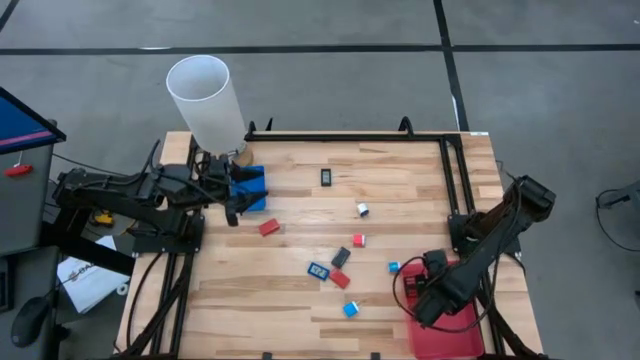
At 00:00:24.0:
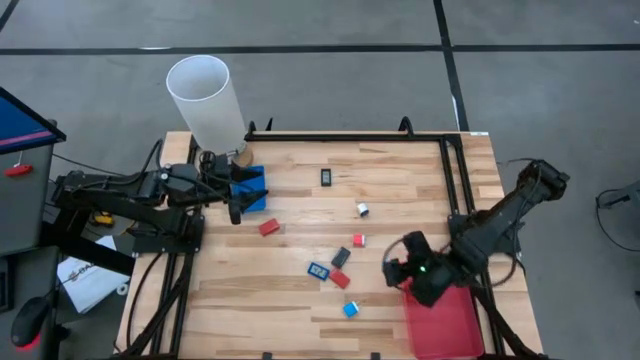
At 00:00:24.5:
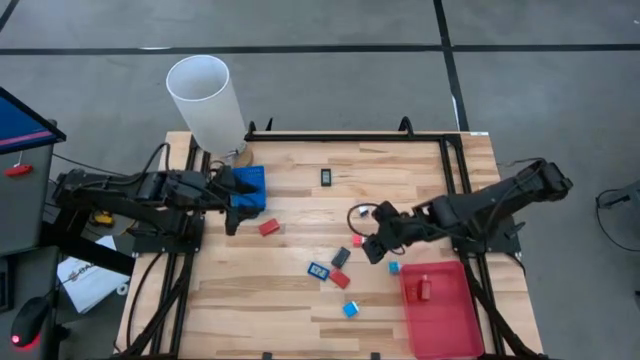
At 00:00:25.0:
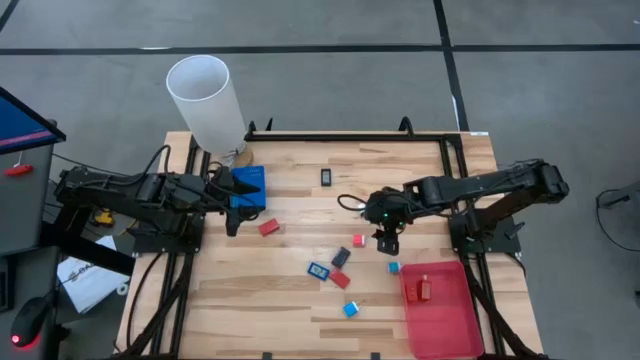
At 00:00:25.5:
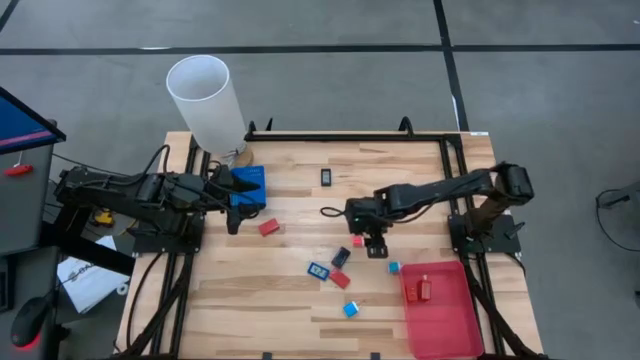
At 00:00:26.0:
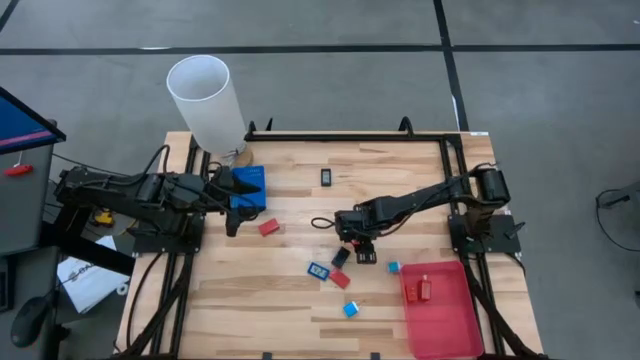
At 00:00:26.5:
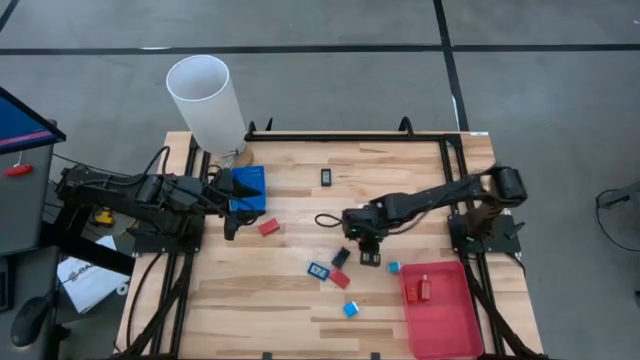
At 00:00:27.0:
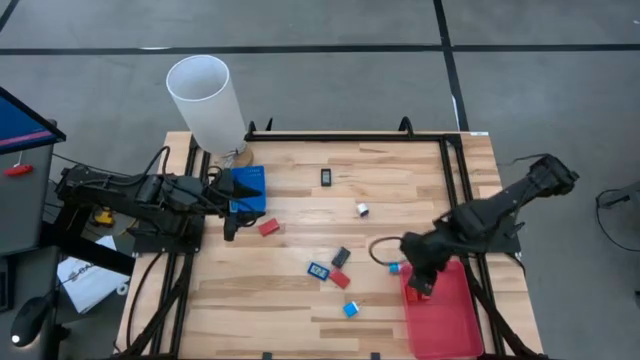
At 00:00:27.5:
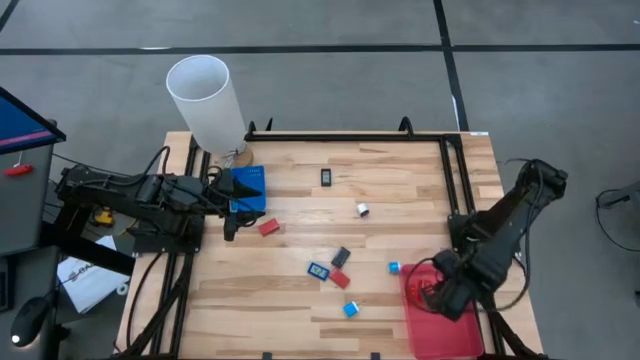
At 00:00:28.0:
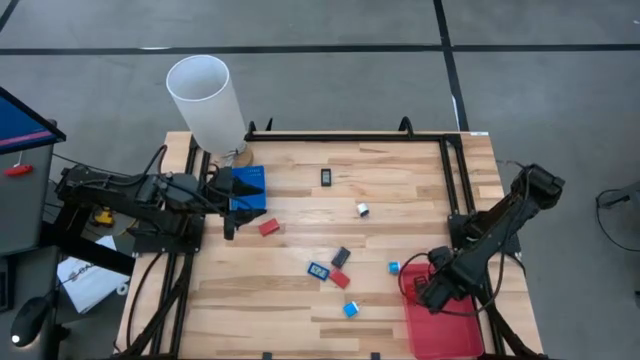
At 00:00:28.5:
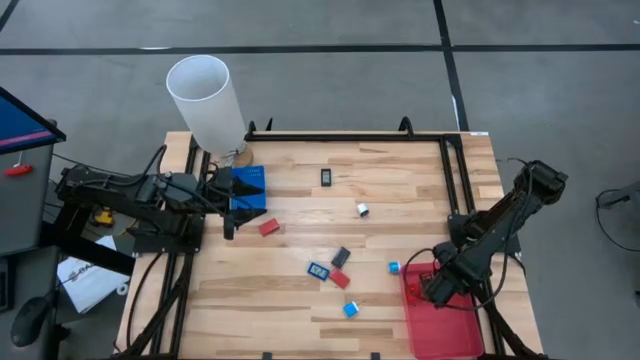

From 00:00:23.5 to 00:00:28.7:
Task: Pick & Place Office items
Put the pink charger adapter into the red bin

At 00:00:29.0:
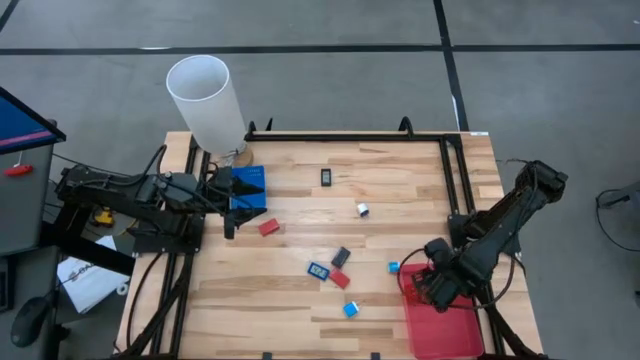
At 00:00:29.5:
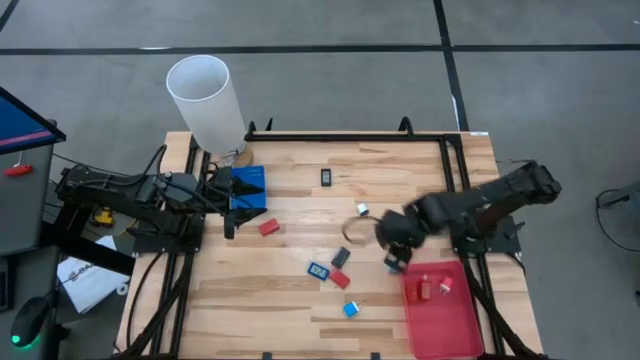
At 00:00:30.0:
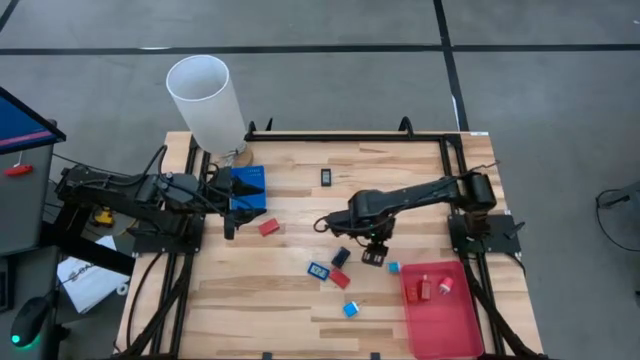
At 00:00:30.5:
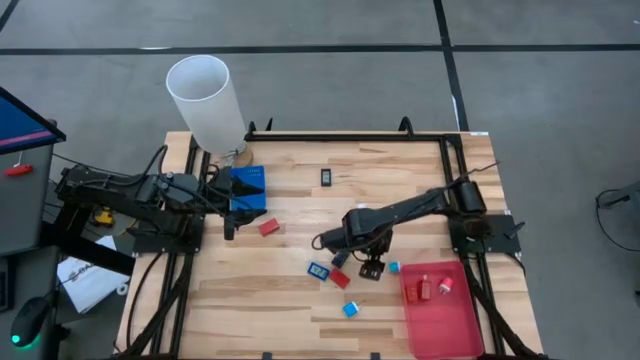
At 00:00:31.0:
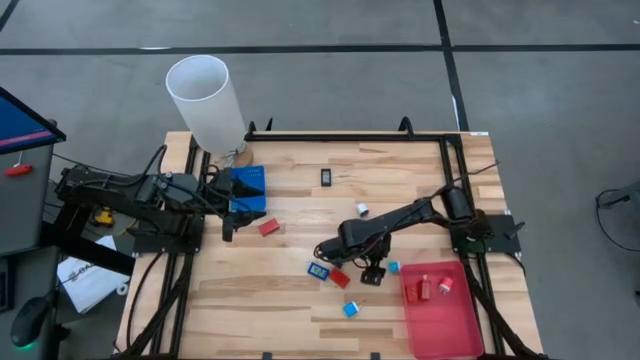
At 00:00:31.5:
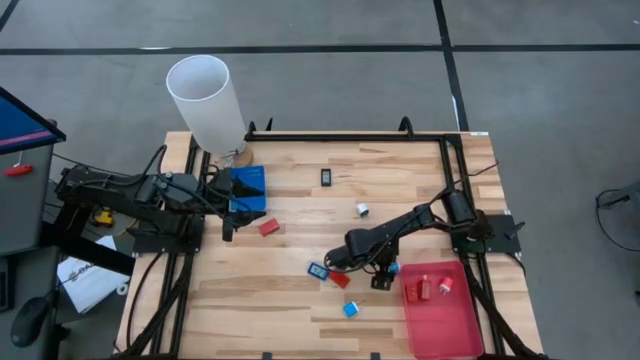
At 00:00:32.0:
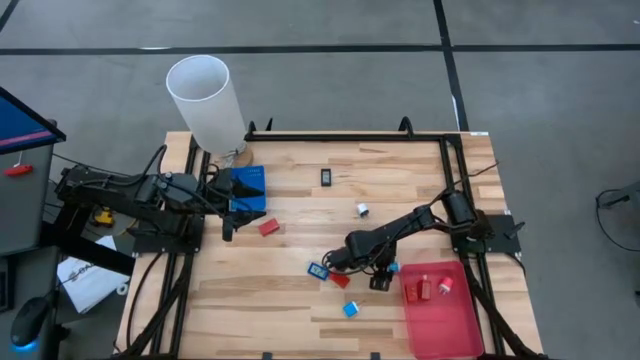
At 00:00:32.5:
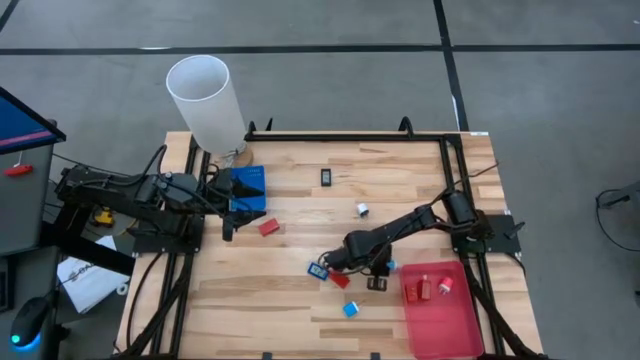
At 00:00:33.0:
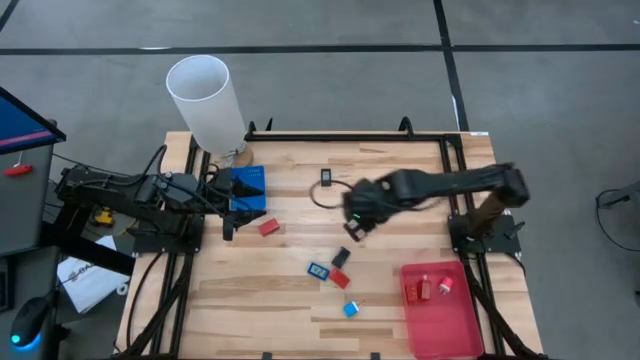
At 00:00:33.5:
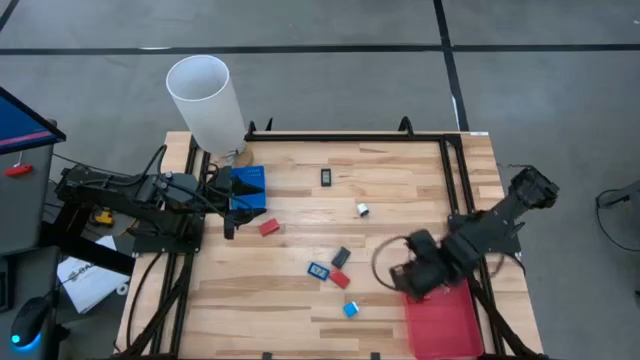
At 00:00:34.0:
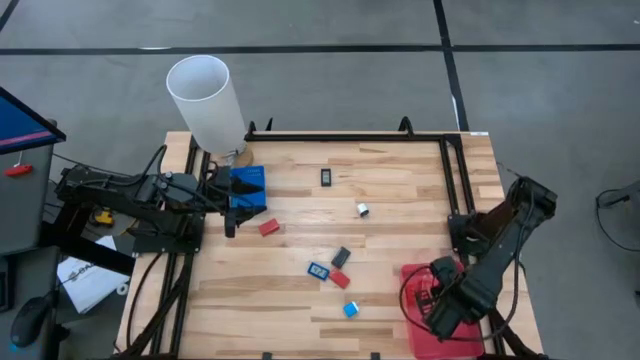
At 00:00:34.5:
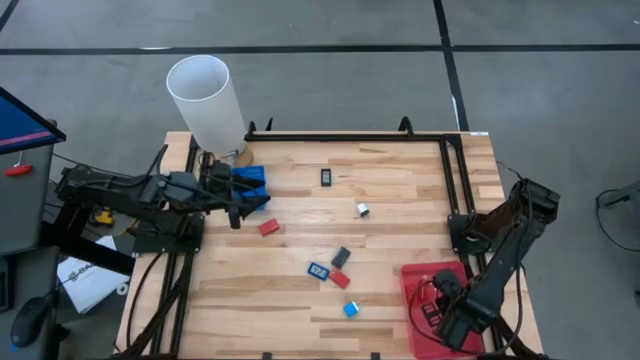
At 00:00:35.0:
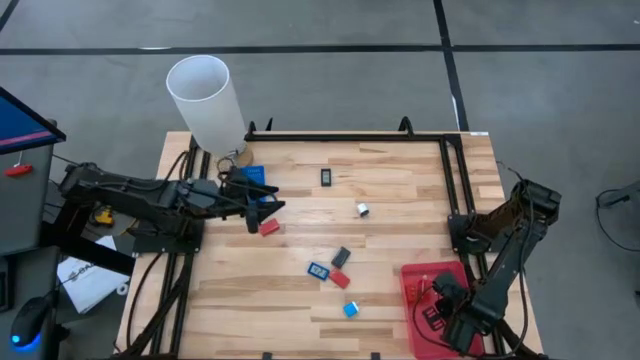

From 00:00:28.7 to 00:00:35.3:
Put the top blue charger adapter into the red bin

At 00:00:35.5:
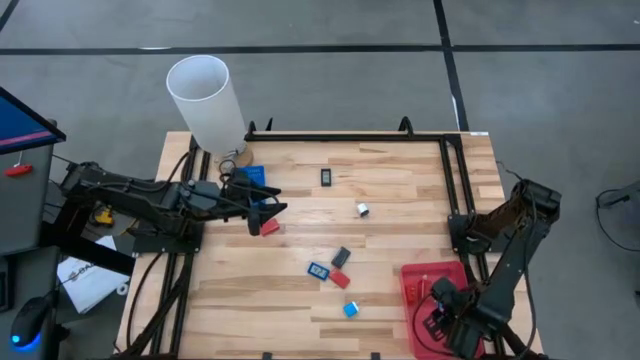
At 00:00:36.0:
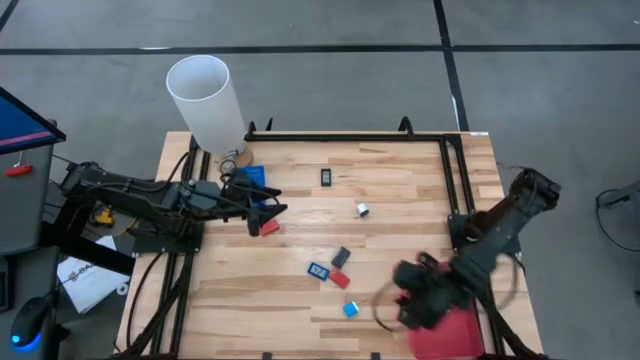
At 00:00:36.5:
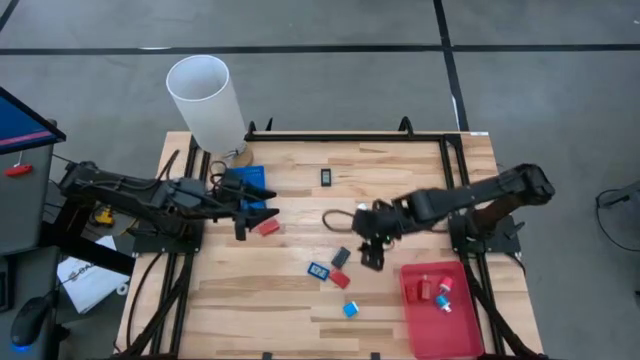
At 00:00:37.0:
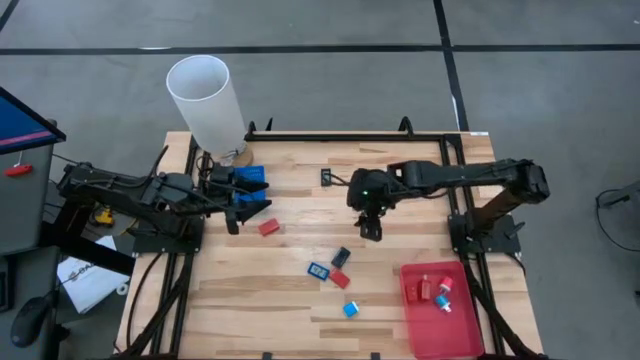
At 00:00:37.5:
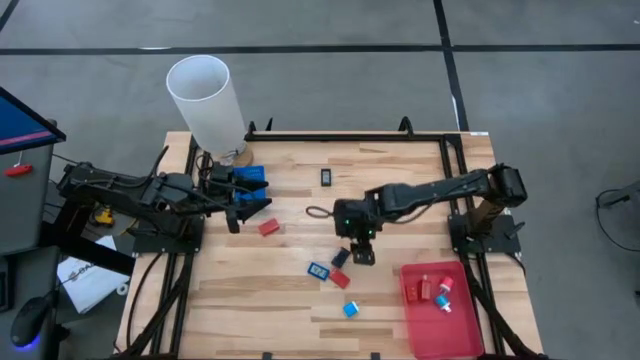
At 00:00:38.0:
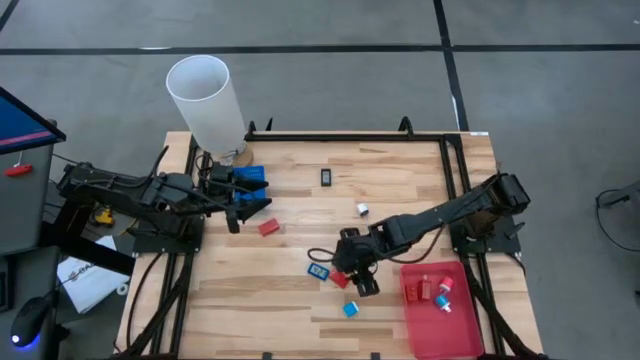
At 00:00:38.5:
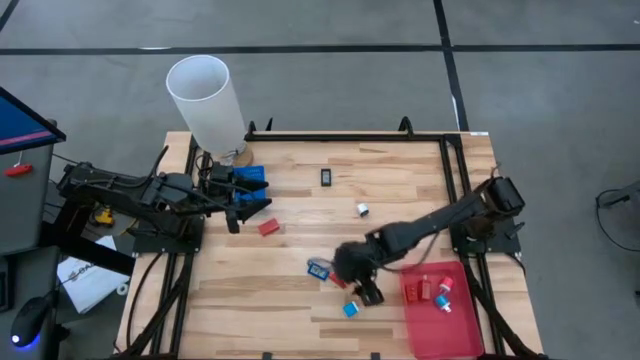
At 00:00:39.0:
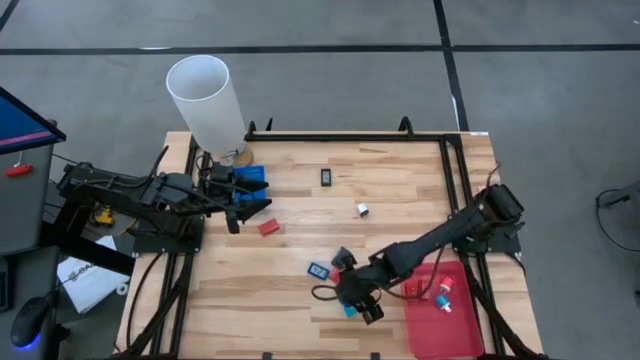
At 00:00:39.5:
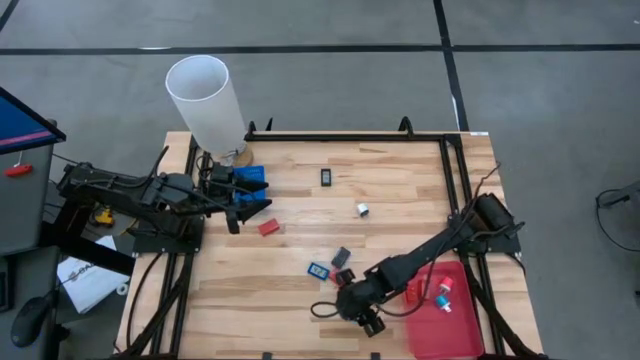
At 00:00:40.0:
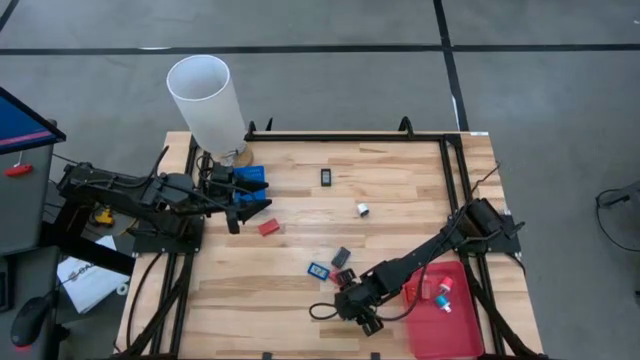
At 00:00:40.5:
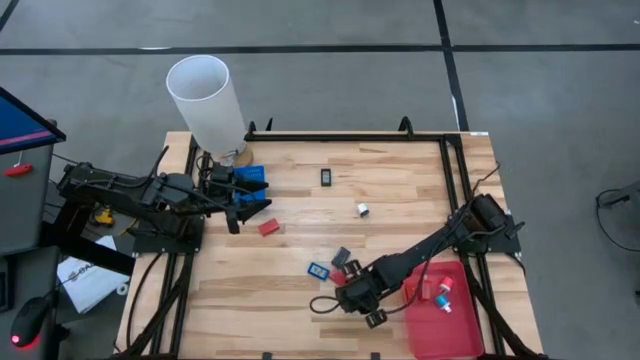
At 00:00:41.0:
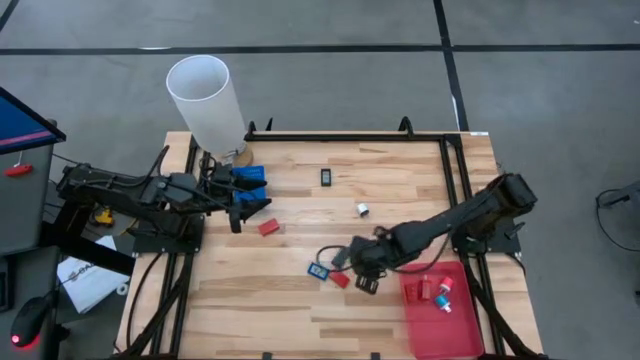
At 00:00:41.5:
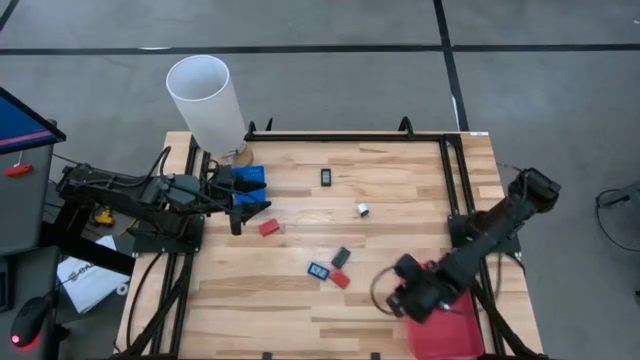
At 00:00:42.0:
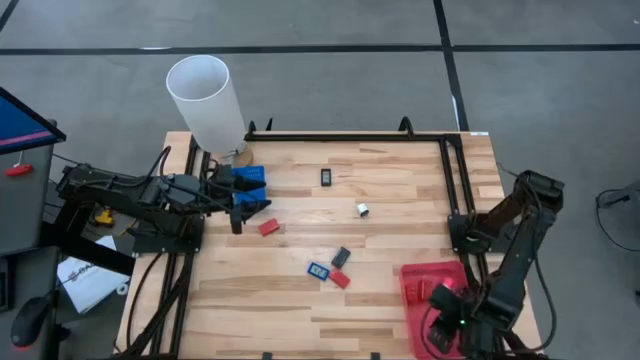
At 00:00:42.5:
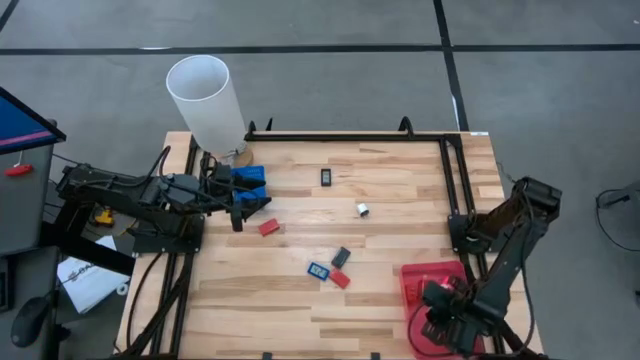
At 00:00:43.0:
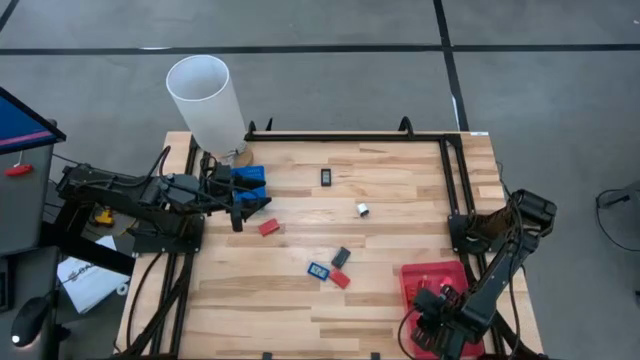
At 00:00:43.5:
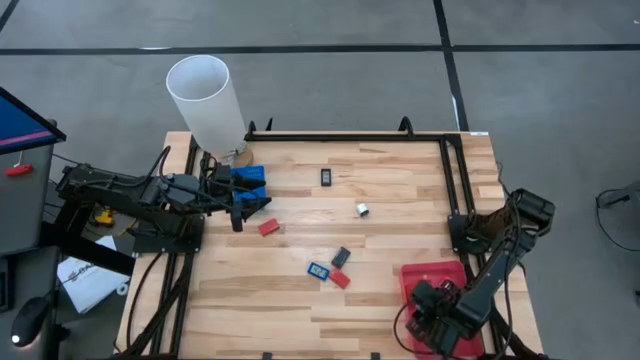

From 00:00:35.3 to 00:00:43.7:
Put the blue charger adapter into the red bin

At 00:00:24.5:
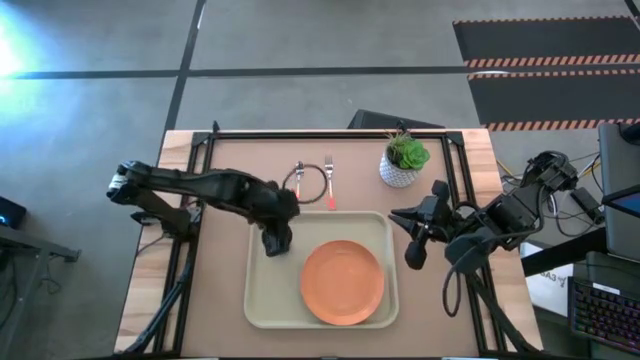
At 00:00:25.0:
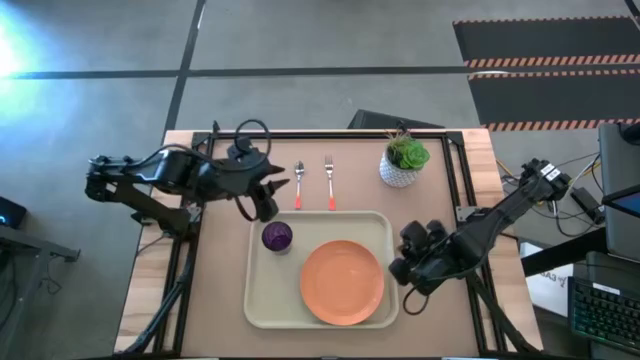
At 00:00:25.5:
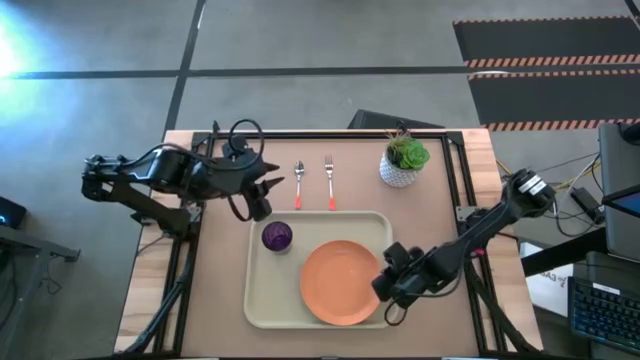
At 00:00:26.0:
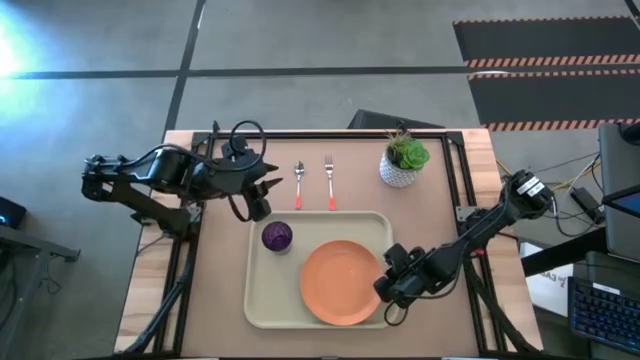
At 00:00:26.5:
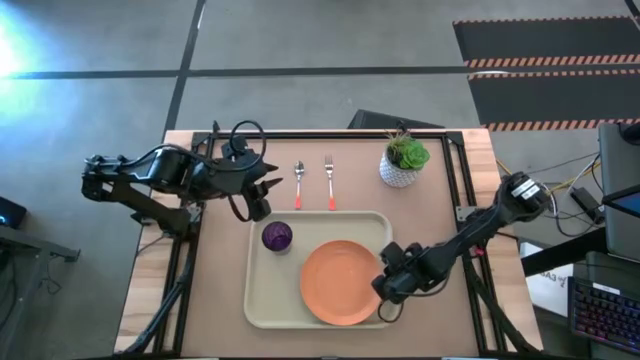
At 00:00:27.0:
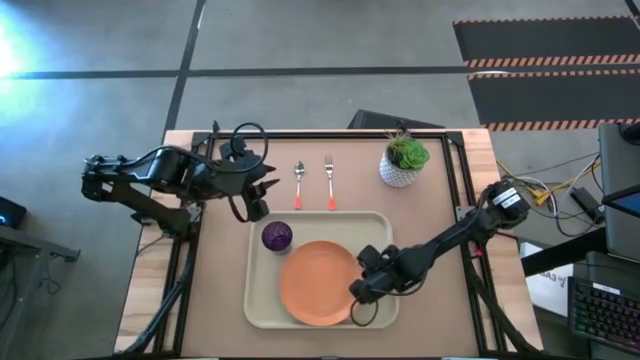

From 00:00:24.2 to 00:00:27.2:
Task: Pick and place plate/cup/fork/spoon on tray
Adjust the orange plate on the white tray
